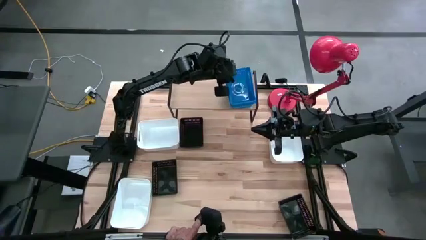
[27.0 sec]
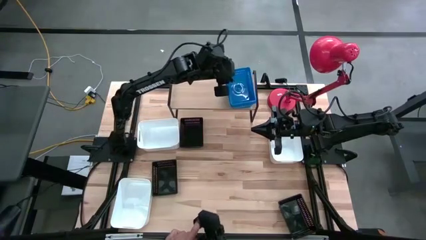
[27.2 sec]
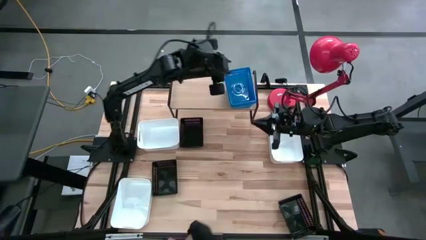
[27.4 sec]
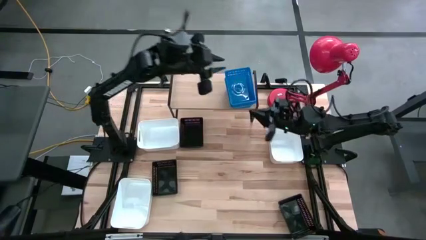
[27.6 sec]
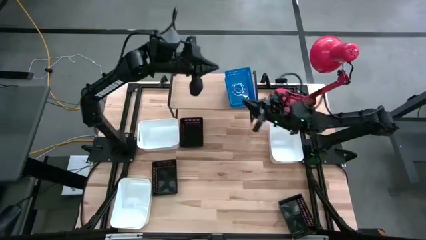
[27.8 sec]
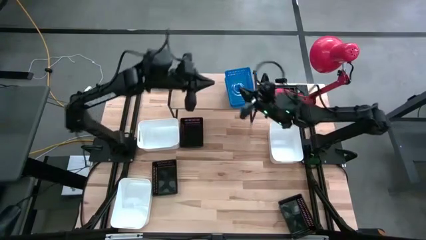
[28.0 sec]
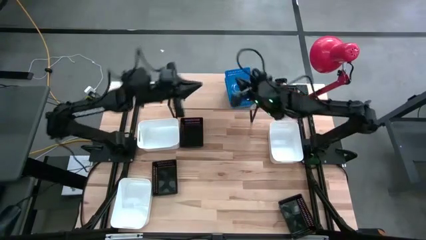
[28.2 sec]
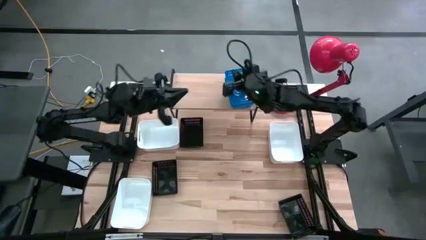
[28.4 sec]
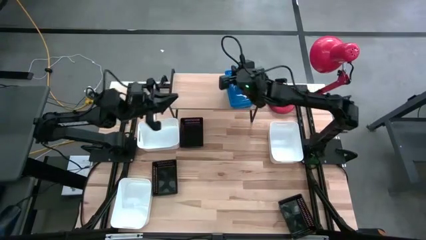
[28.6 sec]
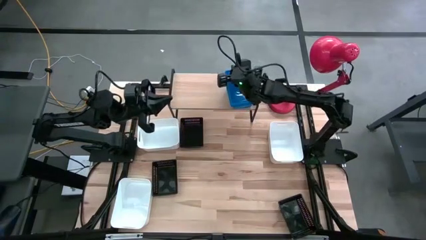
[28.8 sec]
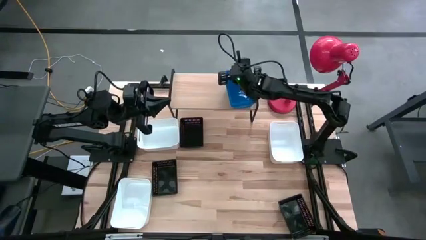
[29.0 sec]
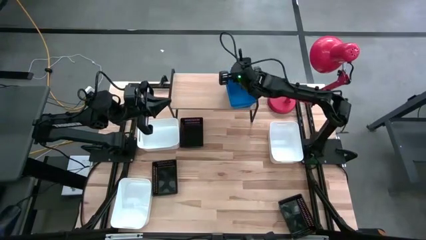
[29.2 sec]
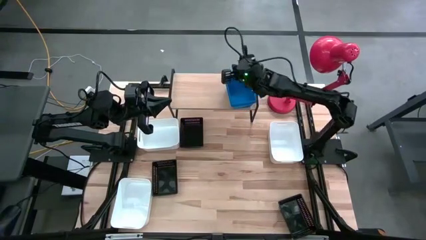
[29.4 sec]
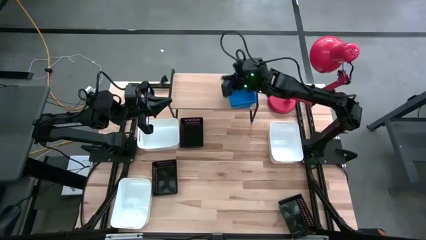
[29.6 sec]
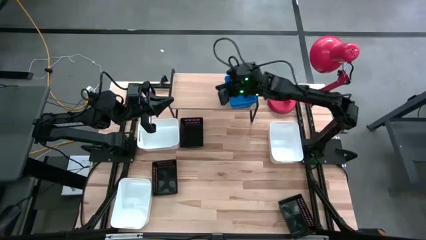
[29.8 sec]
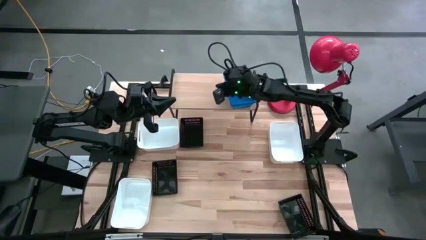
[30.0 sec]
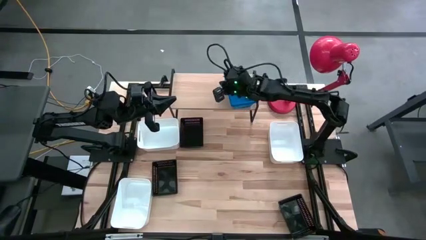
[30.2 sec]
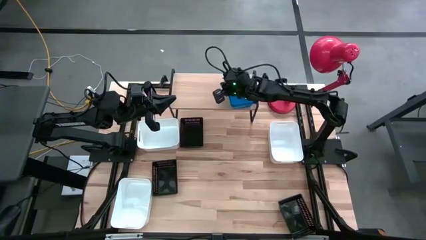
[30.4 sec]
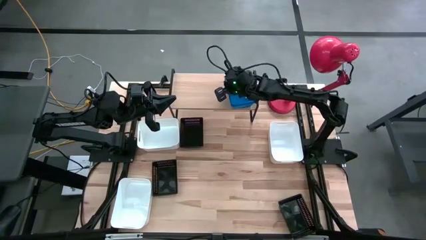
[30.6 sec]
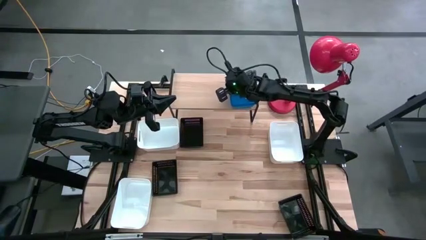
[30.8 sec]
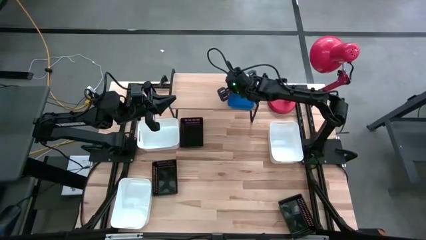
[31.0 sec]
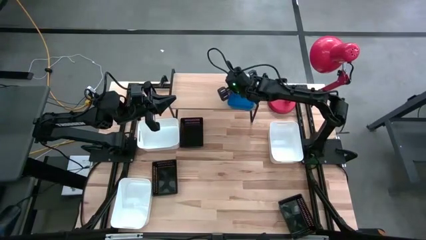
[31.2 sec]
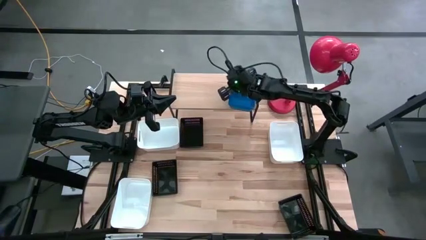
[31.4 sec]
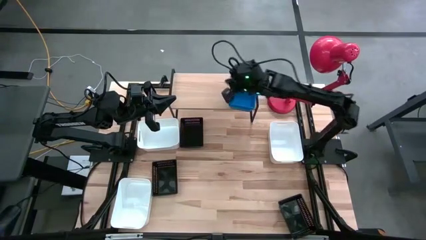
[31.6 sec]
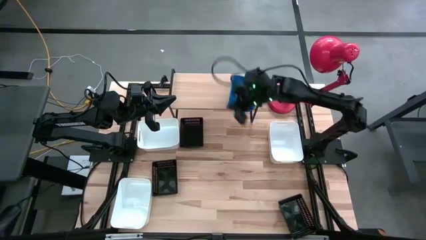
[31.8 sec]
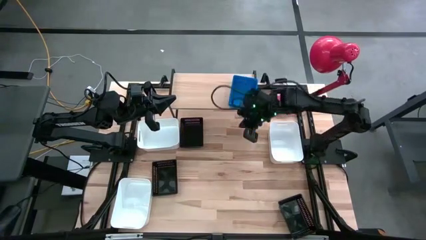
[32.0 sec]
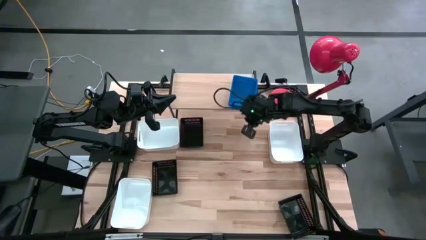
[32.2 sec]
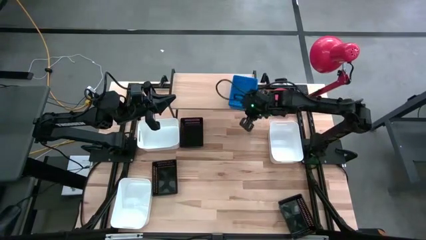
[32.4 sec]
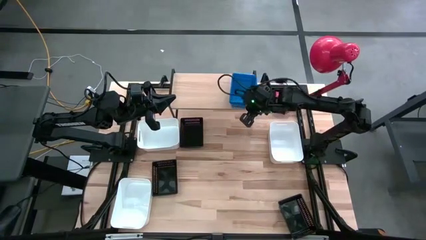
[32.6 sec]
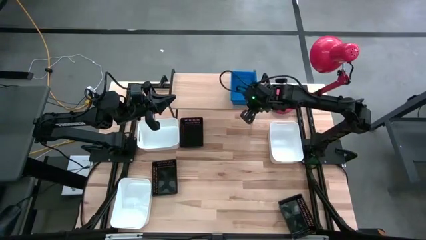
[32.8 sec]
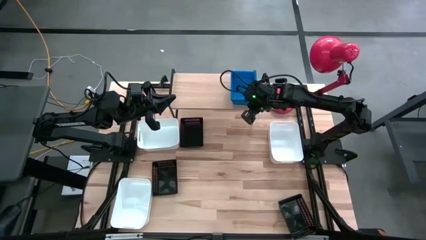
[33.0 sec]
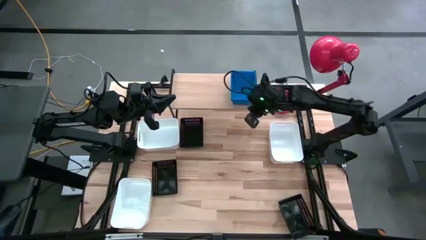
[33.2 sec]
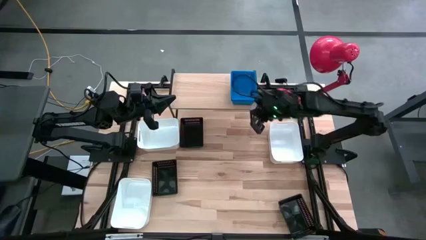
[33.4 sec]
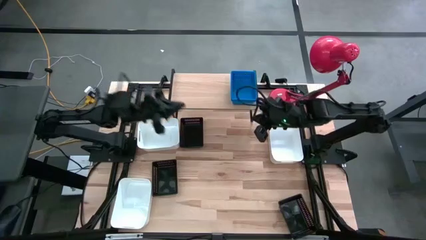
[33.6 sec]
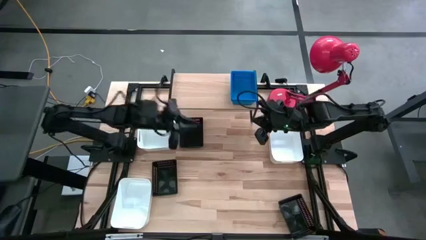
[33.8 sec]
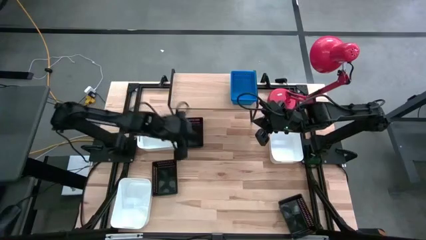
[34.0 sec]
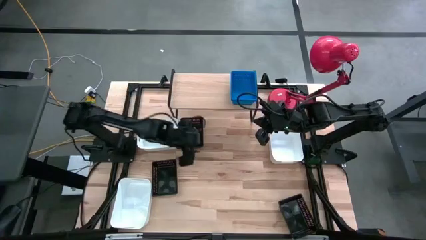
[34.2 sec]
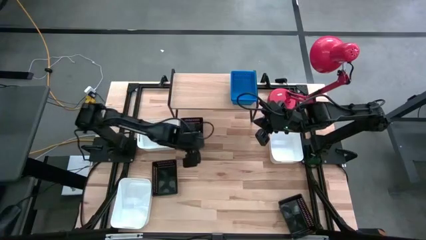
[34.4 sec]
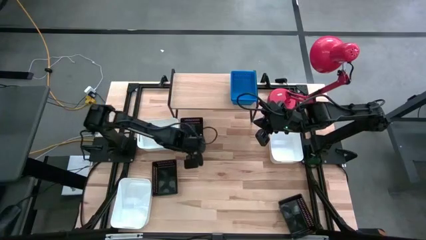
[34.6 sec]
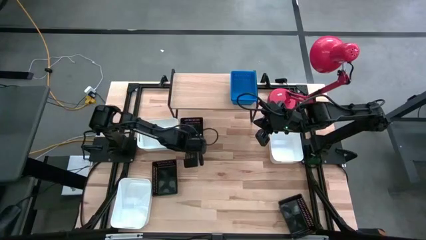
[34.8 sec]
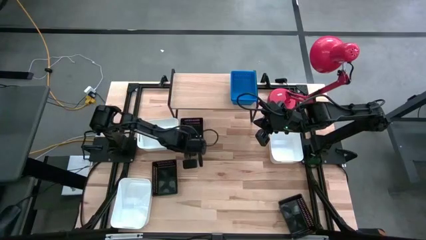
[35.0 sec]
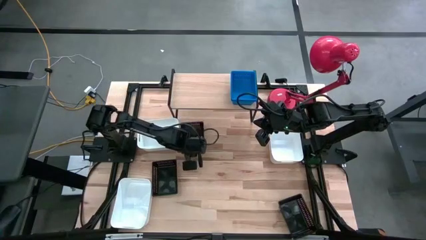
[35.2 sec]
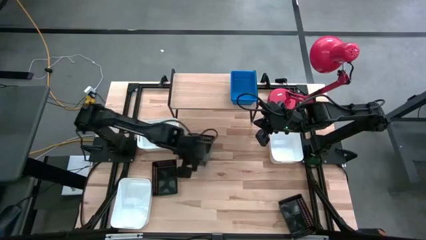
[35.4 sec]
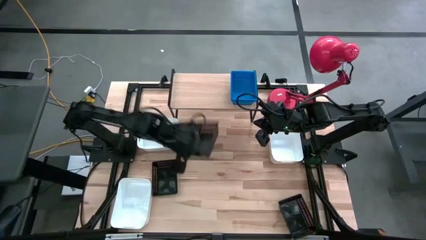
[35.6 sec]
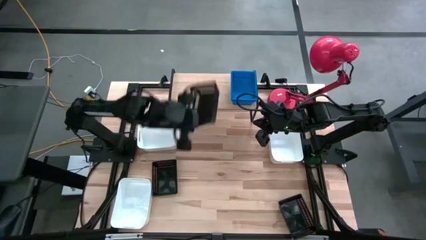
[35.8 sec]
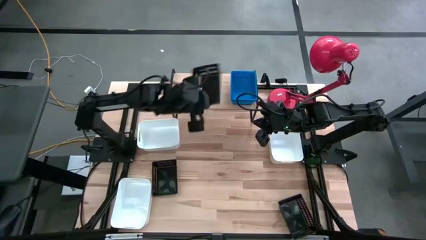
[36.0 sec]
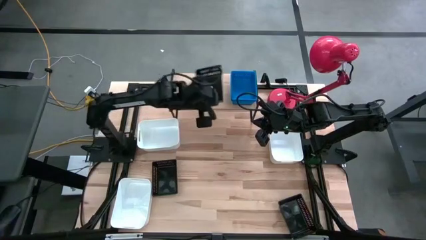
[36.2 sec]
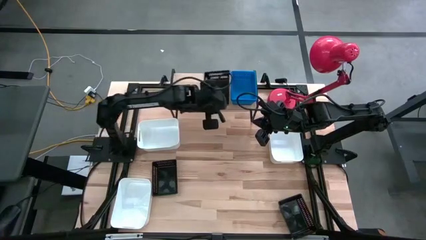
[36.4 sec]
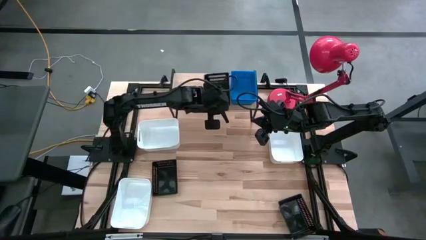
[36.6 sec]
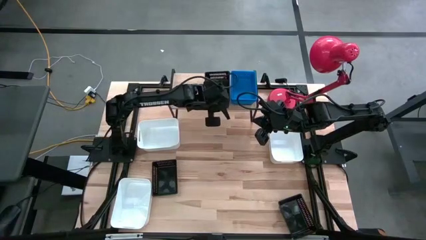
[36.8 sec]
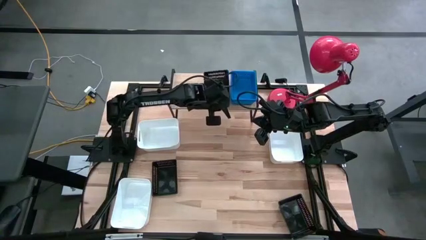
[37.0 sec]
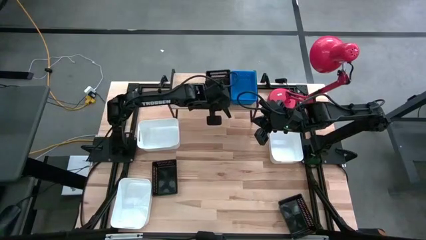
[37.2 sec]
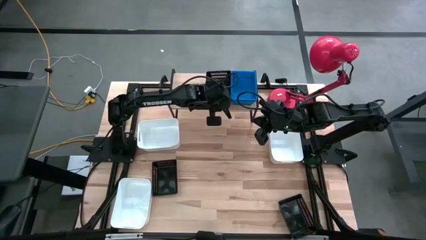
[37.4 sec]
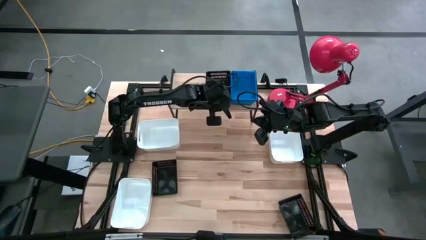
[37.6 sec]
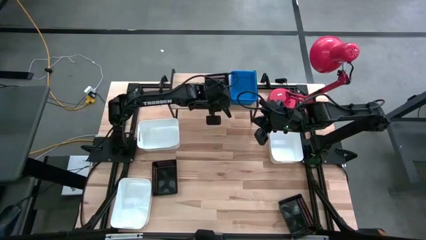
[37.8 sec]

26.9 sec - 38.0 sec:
Task: Stack baskets on shelf by color
Put the top center black bin on the shelf

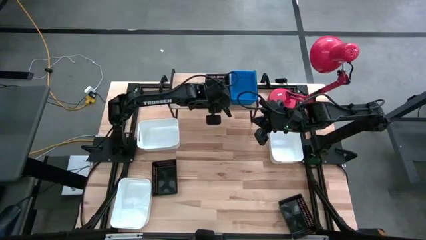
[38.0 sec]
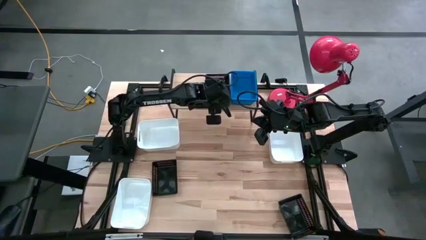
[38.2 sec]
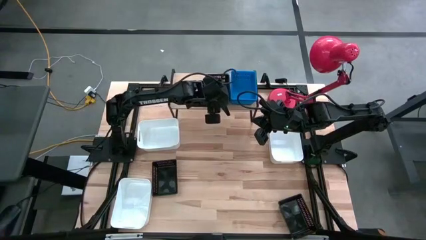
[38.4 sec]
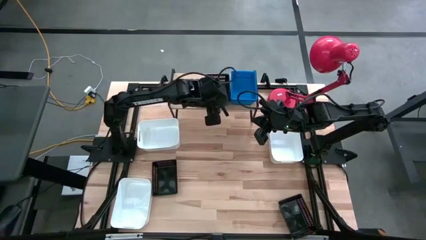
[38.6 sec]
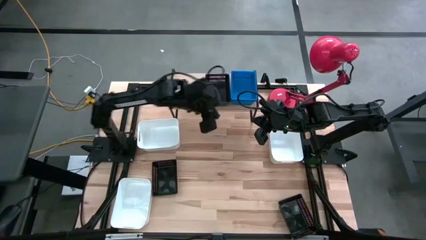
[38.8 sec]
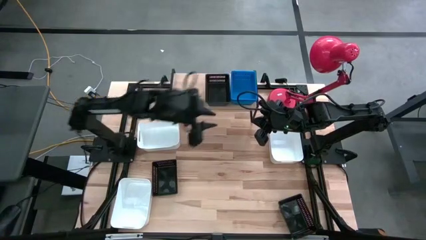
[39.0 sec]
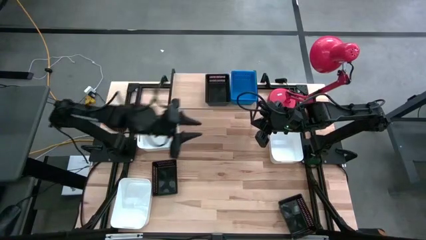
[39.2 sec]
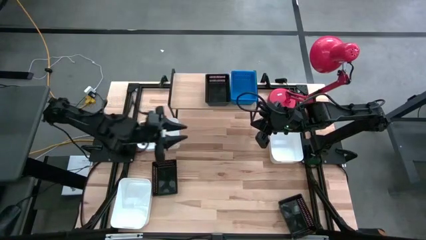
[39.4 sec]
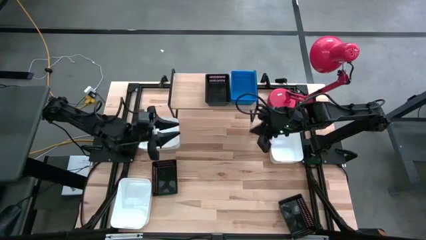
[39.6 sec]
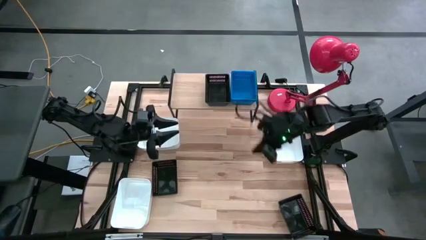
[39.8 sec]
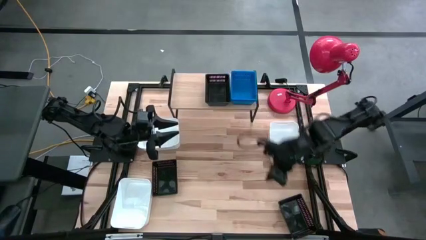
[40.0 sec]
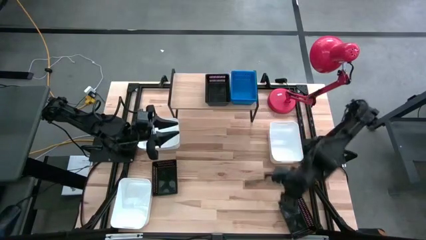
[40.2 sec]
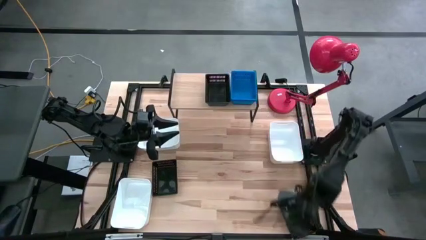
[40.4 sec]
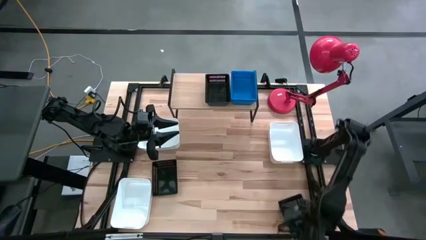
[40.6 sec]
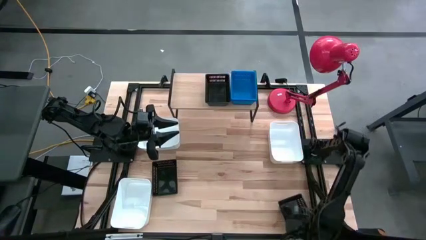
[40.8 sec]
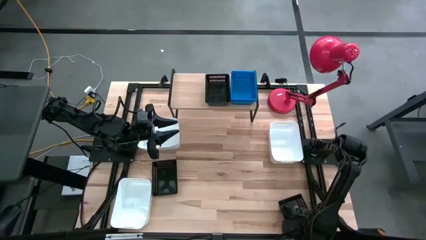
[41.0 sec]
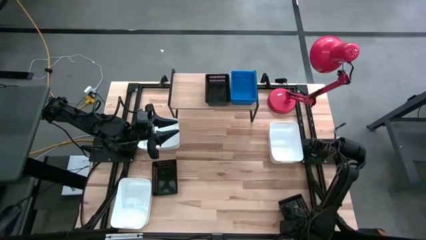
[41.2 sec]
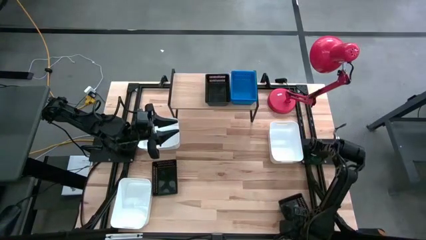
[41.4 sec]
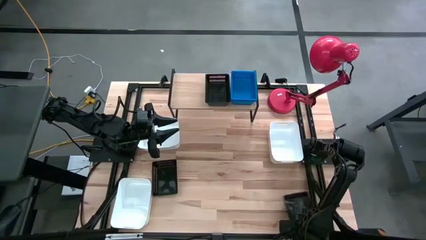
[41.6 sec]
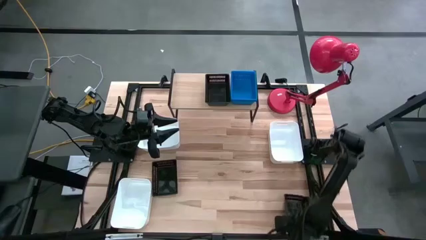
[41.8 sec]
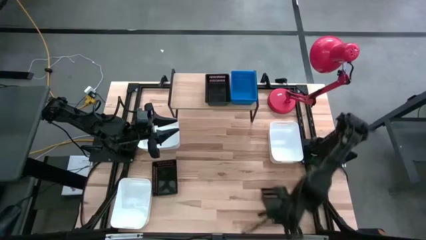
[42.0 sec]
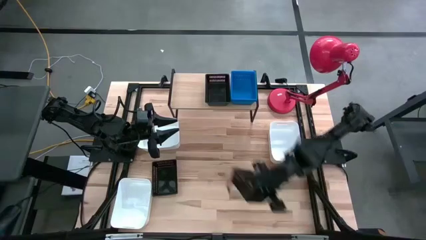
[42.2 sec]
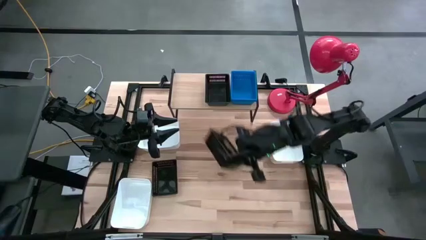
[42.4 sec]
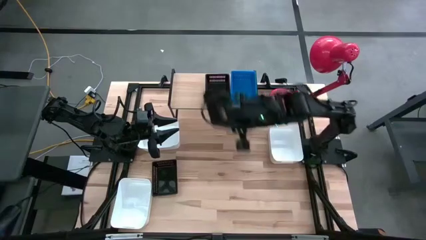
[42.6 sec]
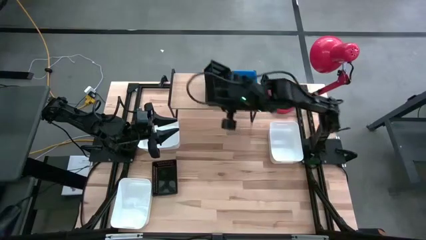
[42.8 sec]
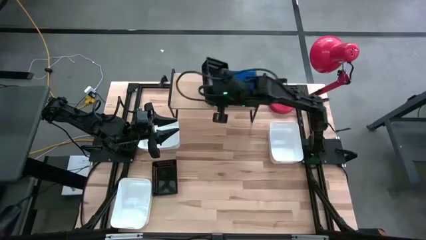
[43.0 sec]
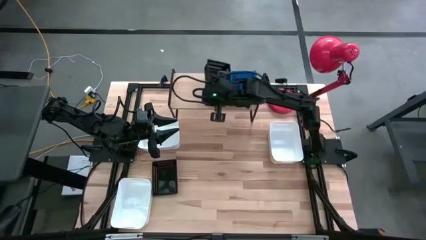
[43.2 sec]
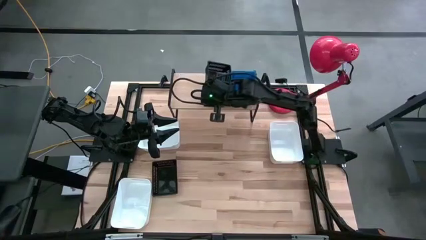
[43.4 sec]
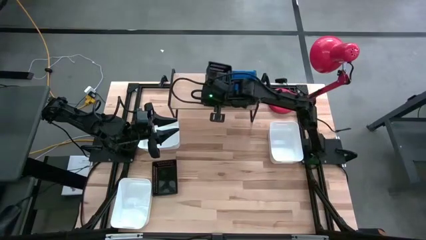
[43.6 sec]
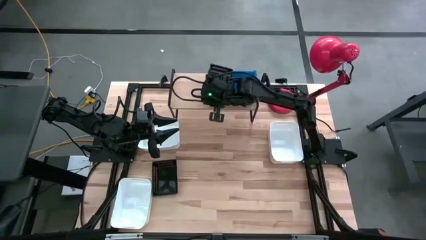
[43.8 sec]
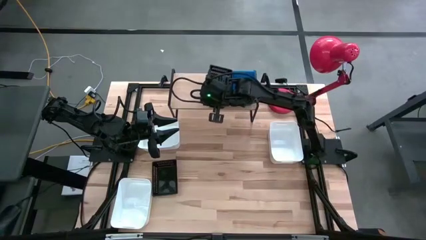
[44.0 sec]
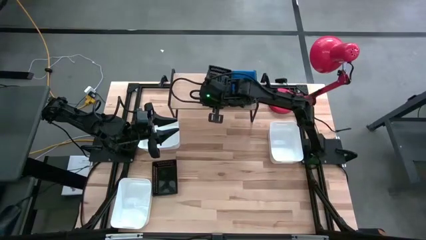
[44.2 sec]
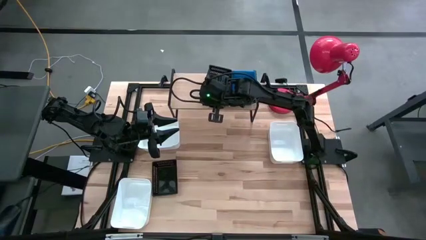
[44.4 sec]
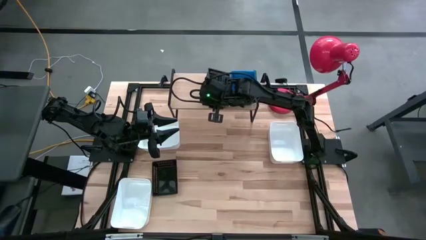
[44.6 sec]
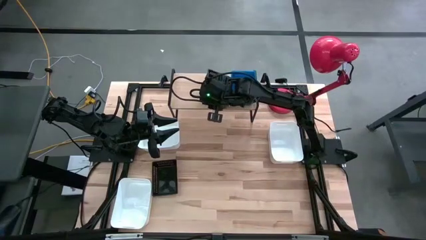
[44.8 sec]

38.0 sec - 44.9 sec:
Stack the bottom black bin on top of the black bin on top of the shelf
